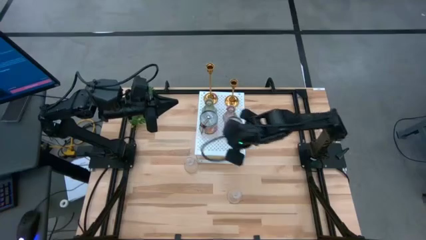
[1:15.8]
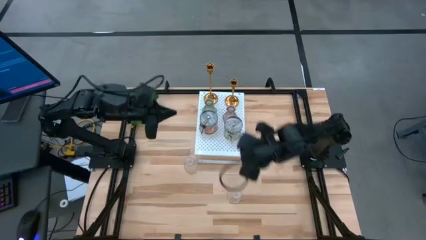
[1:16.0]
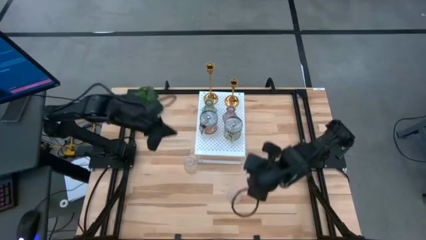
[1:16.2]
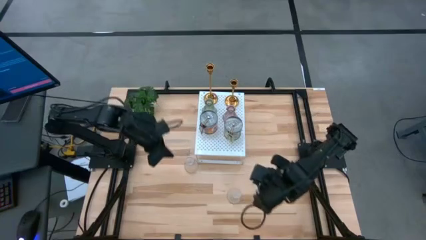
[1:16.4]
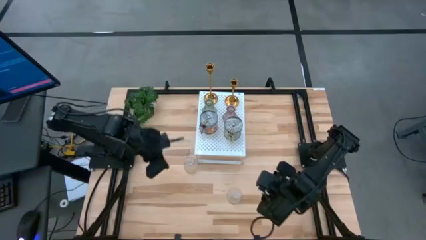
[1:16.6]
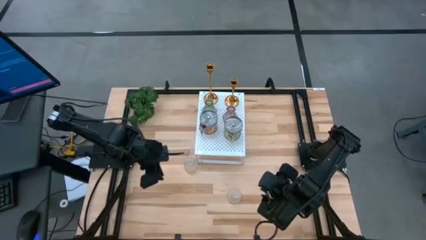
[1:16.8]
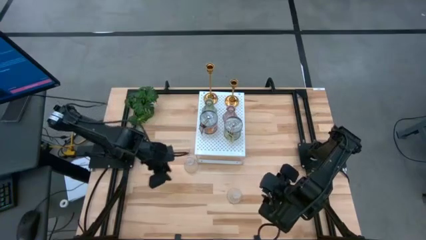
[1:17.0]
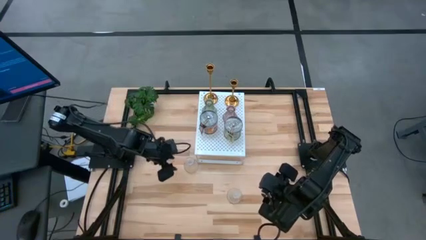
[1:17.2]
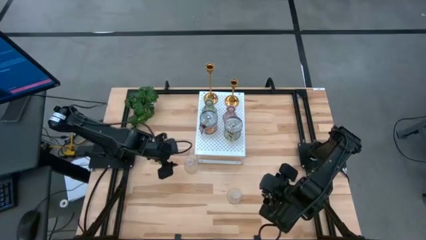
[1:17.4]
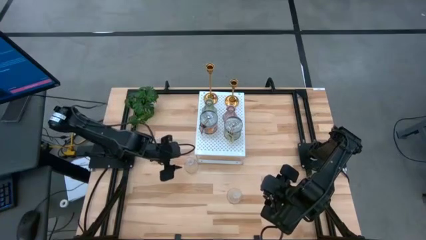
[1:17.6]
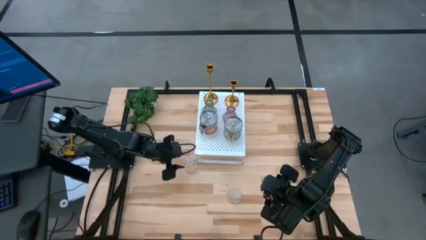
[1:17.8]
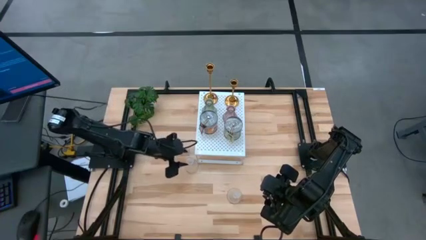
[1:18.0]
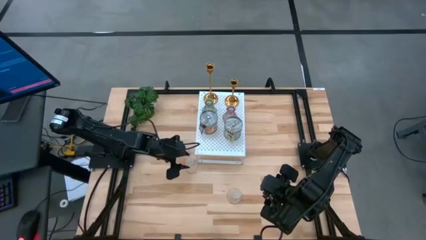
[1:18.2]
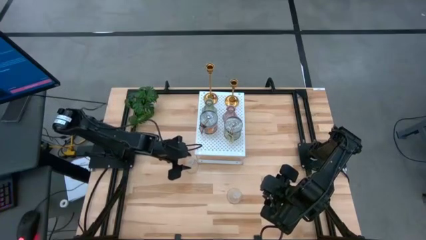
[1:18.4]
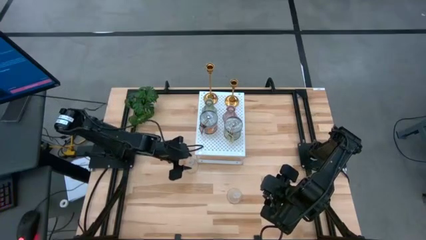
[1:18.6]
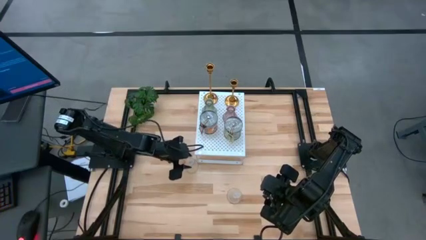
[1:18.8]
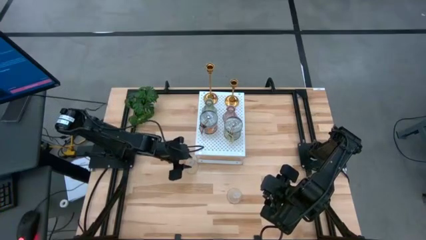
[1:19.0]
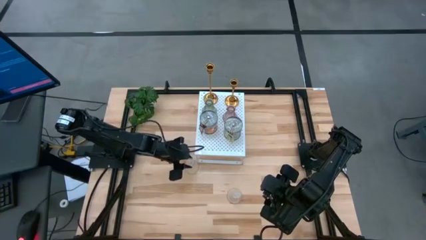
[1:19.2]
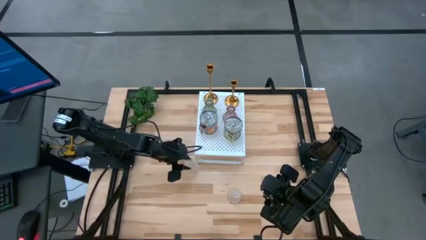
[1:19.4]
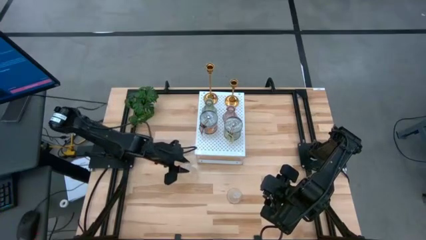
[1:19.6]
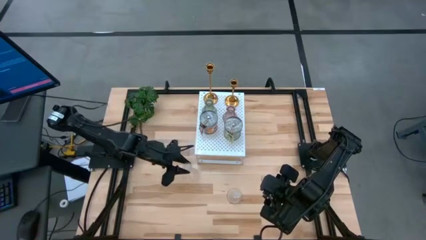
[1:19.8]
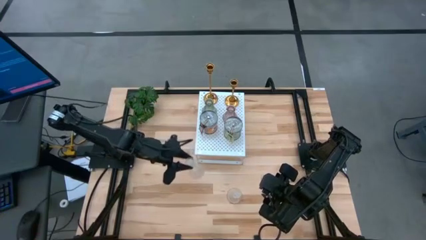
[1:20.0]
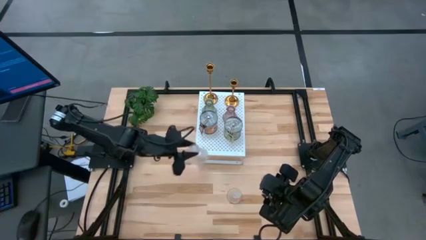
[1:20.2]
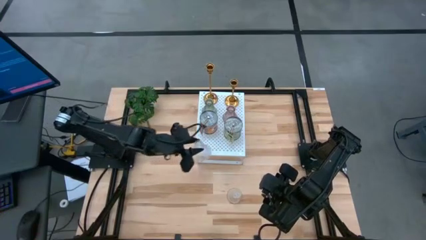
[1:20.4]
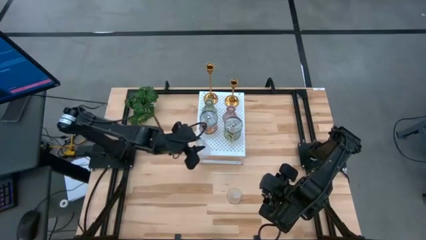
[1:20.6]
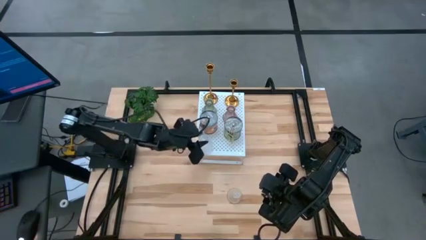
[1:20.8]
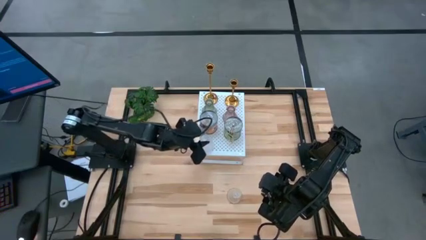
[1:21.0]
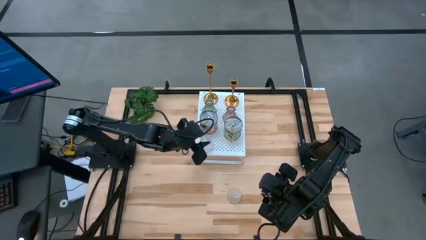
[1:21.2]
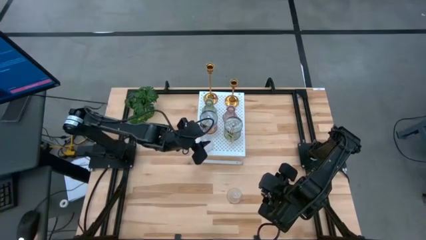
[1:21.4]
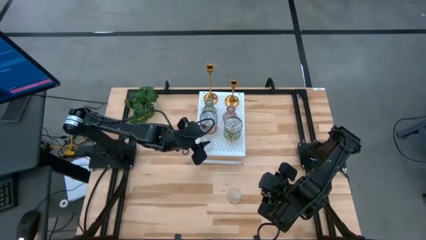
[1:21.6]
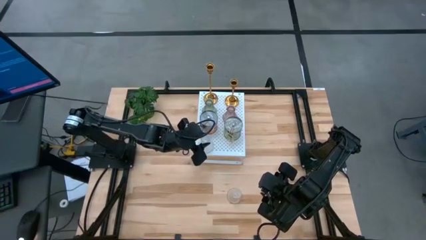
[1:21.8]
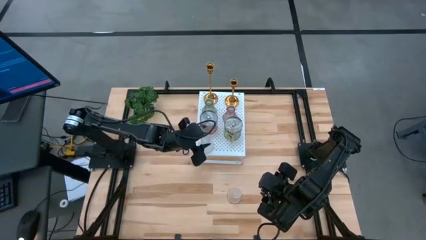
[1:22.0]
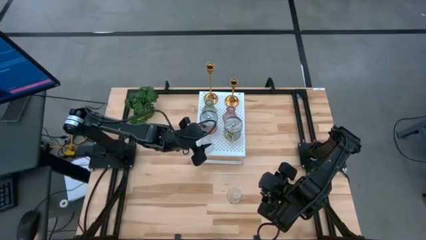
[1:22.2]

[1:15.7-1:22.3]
Task: Pick & Place candle stick holders
Put the top transparent glass candle holder on the shelf

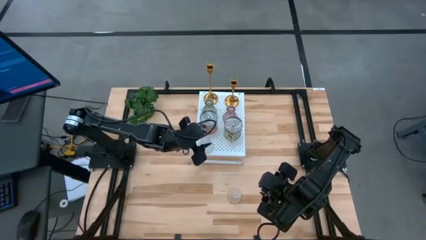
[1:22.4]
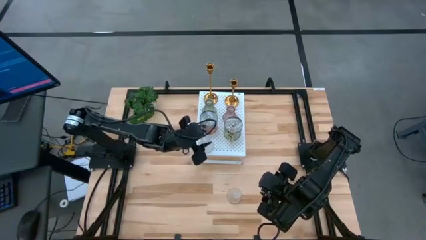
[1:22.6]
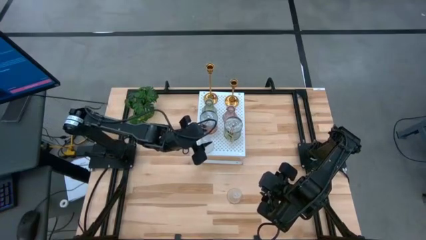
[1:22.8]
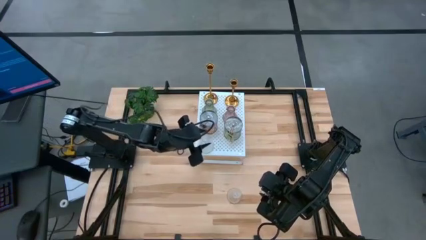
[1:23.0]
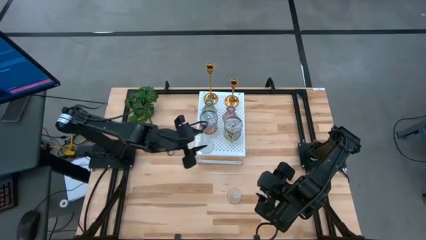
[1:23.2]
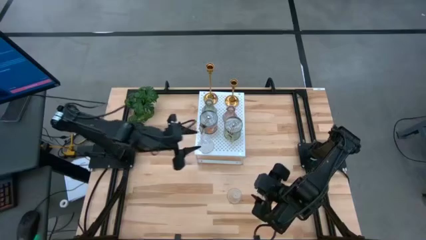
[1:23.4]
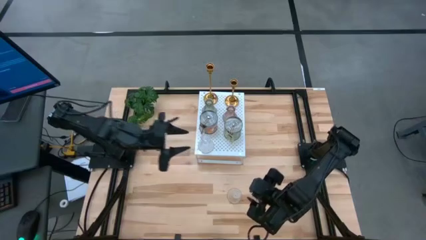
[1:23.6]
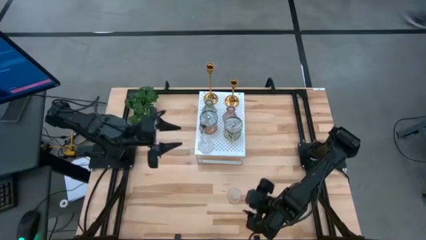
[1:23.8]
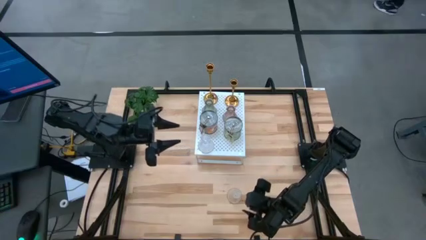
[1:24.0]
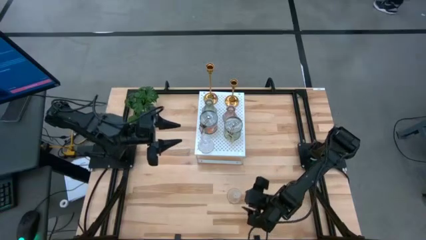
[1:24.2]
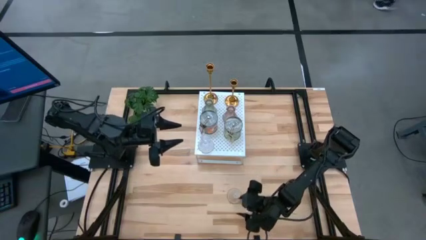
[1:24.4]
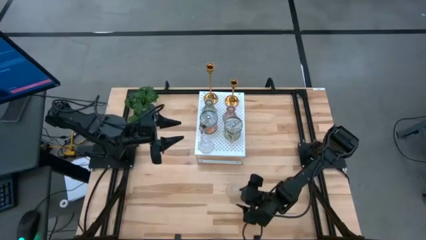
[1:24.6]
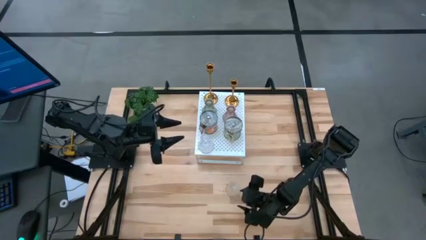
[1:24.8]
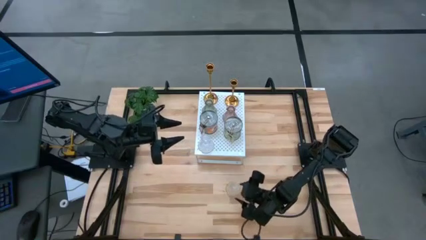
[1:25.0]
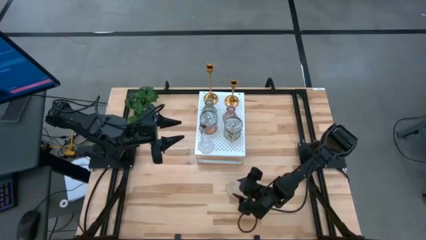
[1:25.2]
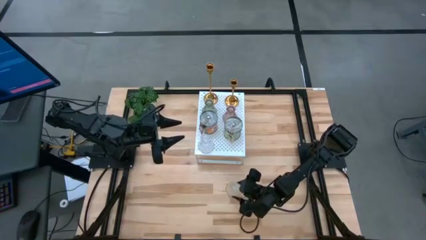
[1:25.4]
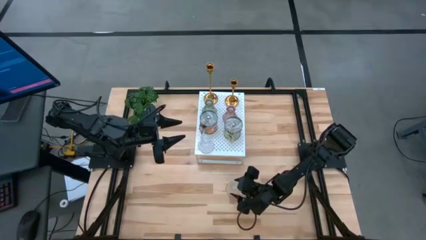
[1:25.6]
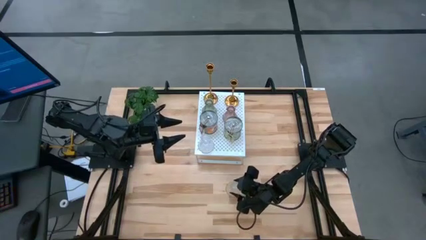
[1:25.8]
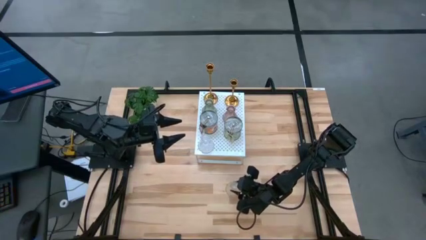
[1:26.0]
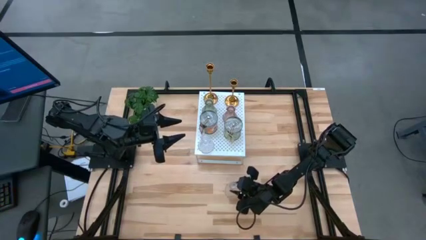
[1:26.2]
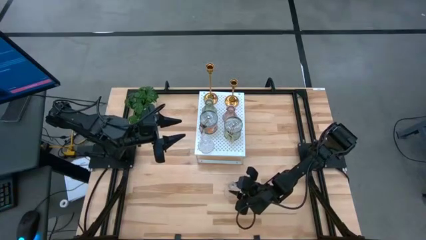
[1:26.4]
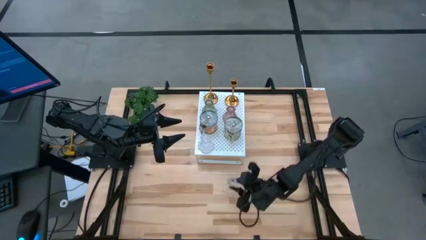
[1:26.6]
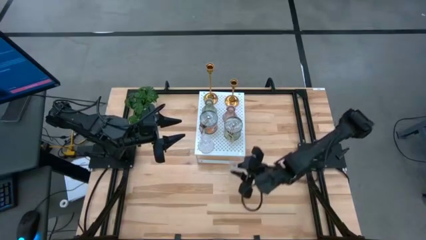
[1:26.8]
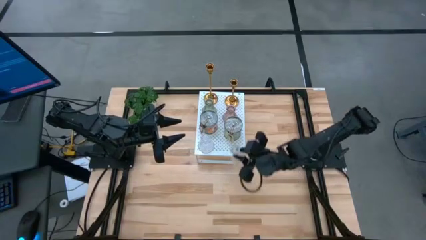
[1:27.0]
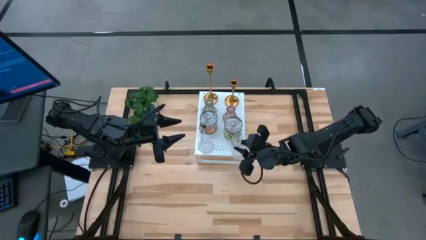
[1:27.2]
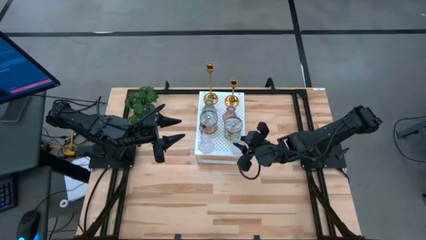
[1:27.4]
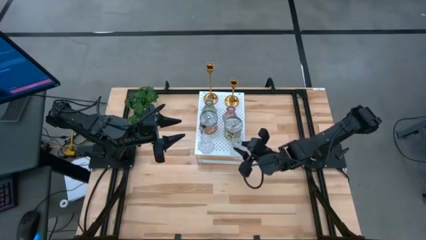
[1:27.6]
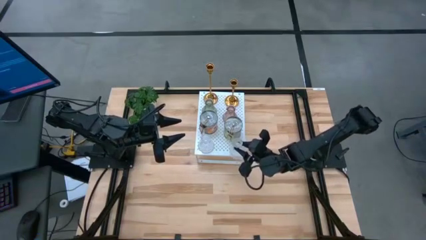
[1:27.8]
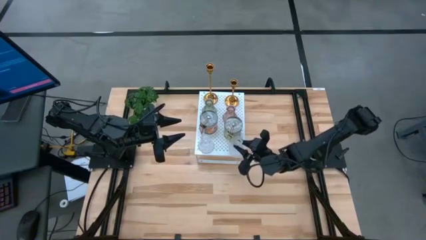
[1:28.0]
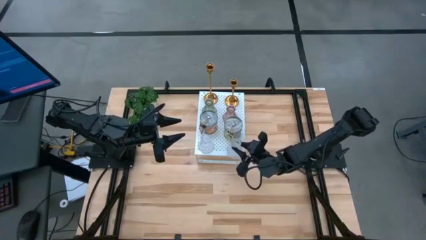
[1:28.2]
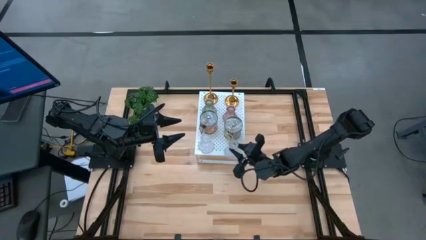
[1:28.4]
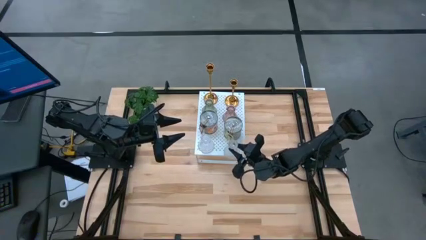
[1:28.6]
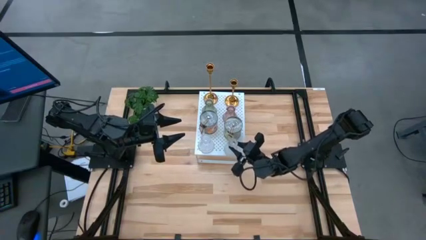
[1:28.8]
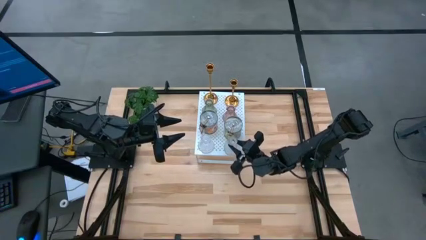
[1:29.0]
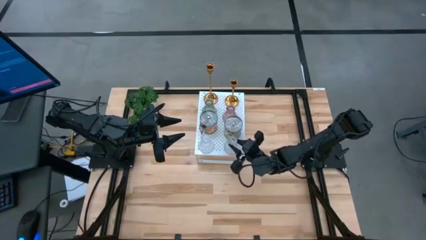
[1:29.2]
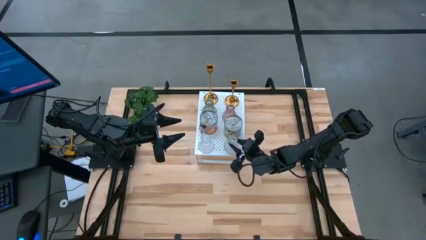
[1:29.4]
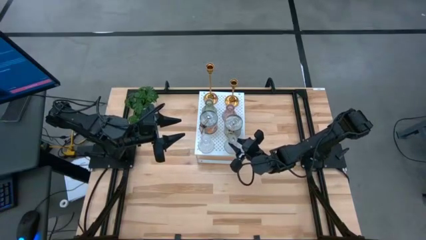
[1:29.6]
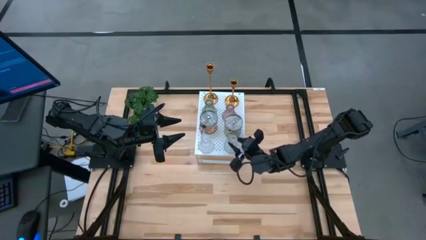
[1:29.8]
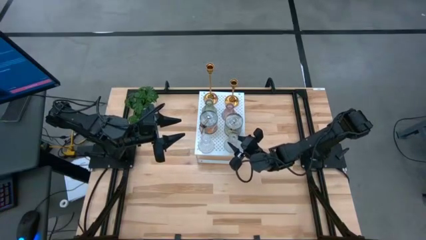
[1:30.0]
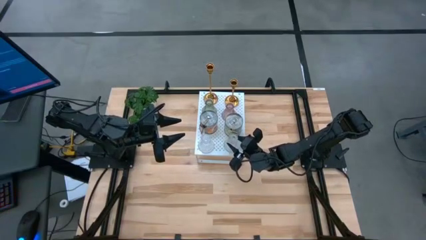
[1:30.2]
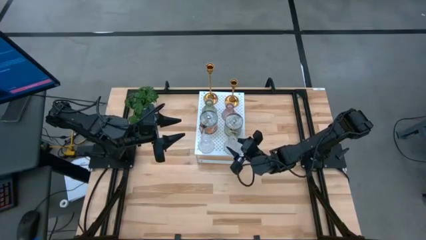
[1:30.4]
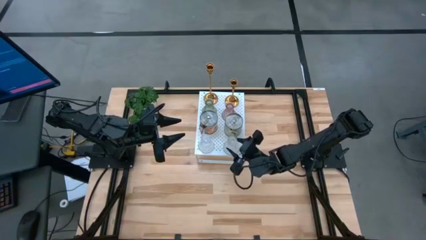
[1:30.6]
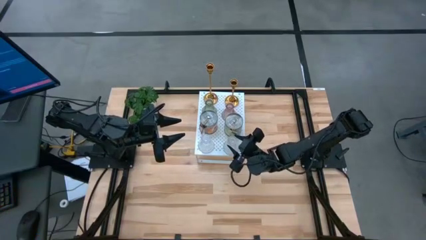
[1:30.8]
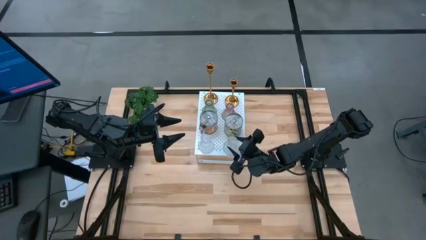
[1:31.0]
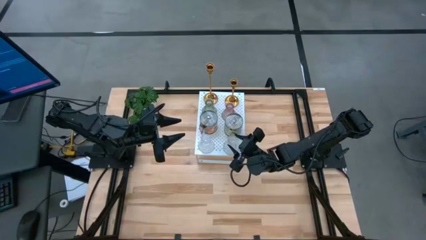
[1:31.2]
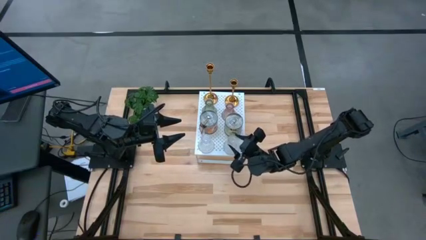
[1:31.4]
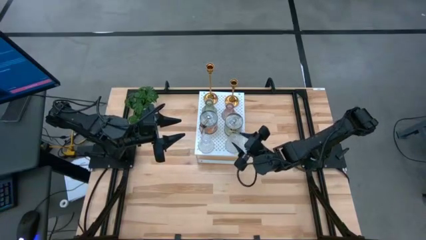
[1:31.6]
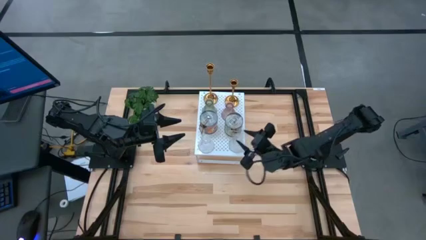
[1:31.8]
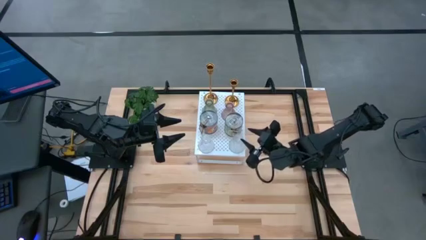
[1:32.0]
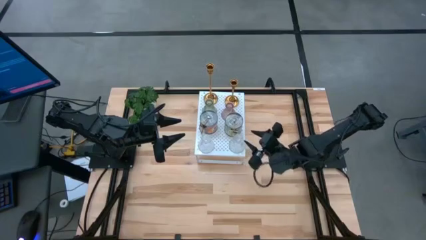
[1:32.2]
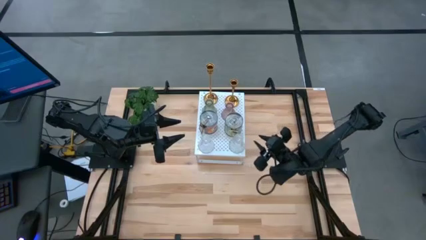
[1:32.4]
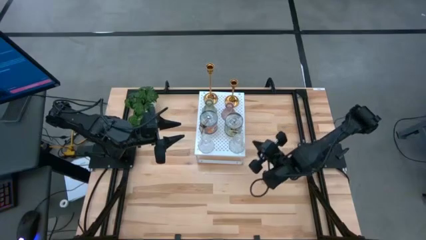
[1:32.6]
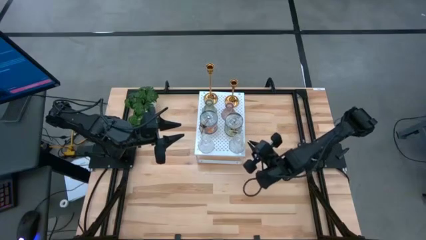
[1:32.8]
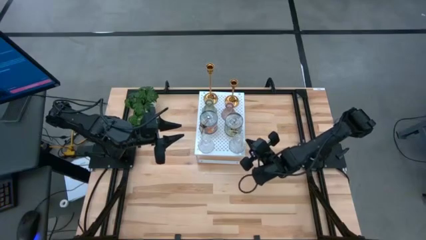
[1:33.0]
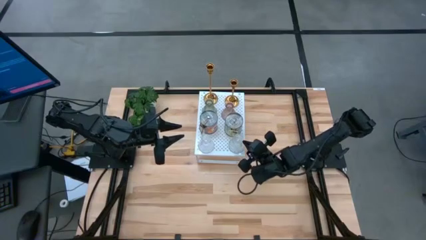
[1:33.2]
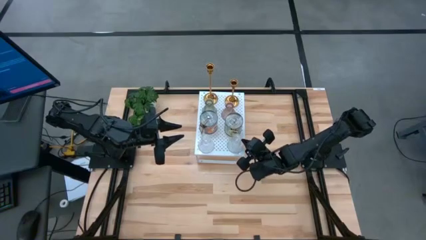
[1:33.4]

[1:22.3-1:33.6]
Put the transparent glass candle holder on the shelf
